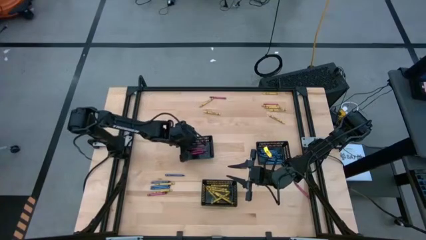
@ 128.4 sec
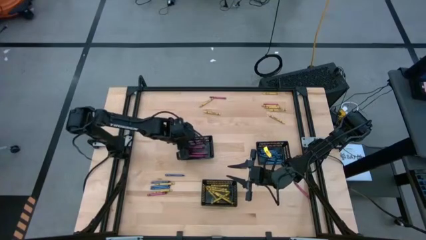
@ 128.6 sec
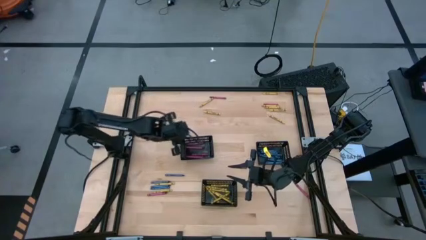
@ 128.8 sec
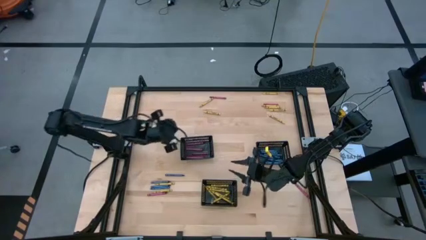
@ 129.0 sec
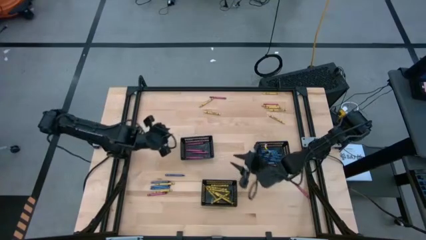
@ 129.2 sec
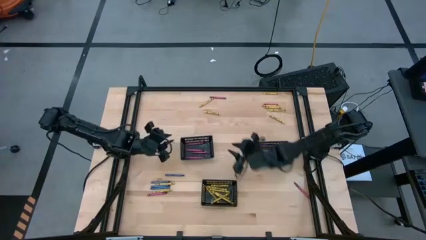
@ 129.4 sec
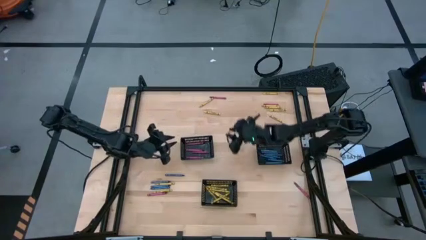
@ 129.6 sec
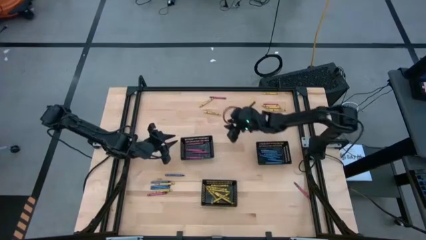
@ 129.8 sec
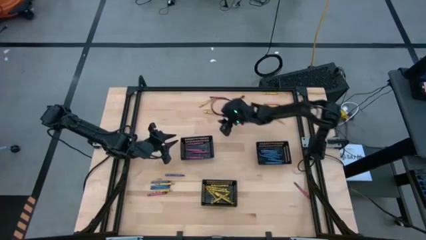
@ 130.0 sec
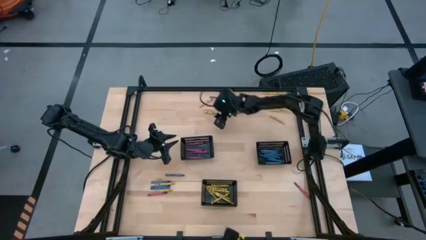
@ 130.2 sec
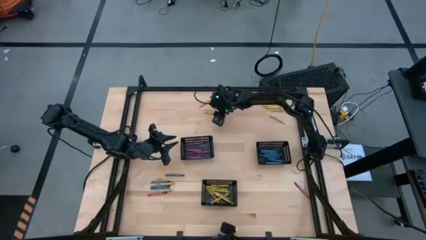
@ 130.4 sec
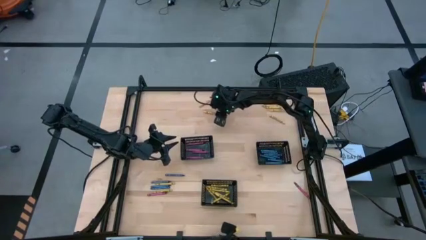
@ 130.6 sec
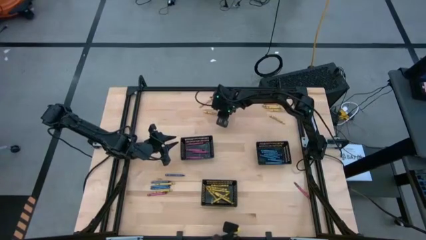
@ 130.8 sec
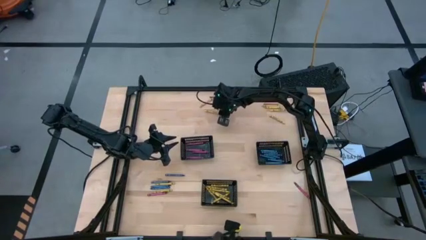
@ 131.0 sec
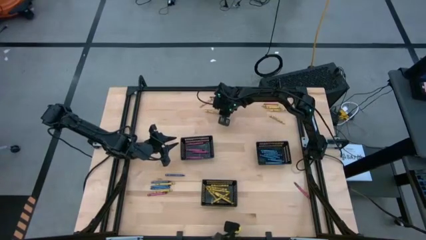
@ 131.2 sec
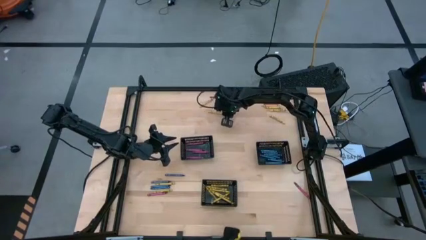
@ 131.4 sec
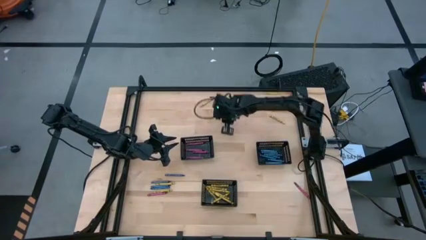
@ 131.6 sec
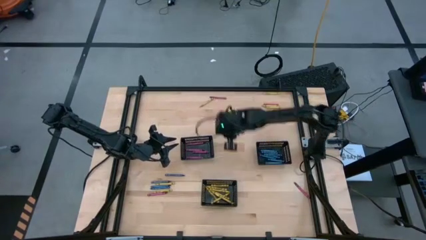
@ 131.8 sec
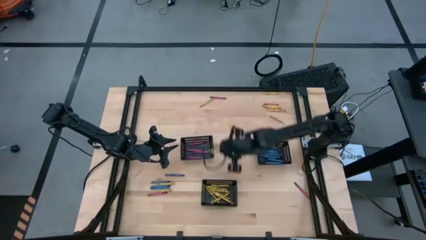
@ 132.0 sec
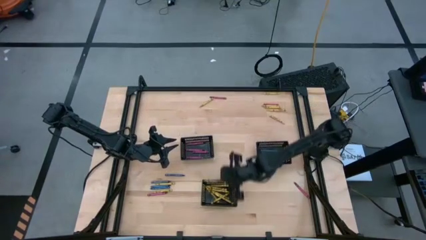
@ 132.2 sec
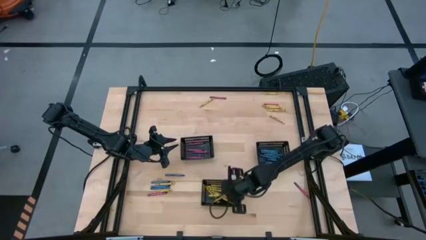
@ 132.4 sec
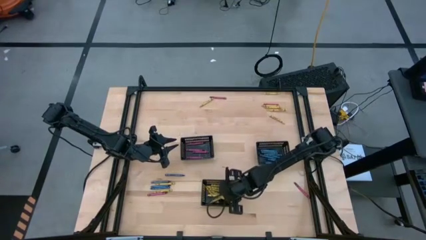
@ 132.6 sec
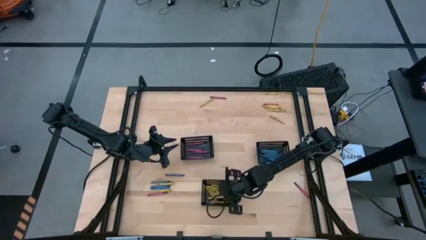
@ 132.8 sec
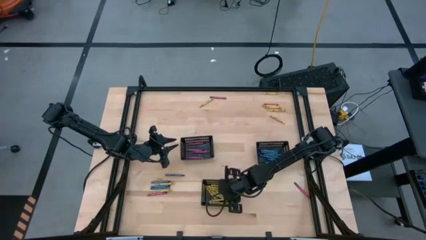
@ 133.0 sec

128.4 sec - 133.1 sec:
Task: Sort crayons
Put the yellow crayon into the bottom black bin

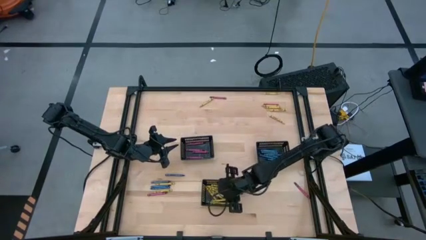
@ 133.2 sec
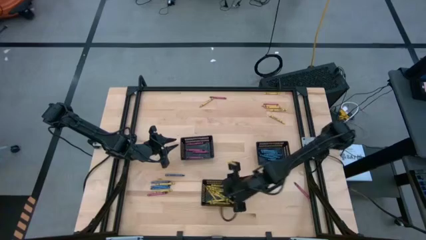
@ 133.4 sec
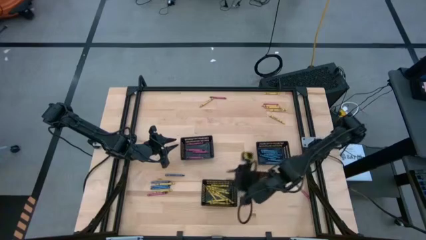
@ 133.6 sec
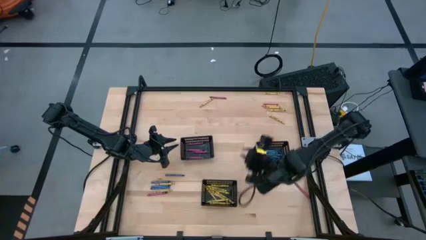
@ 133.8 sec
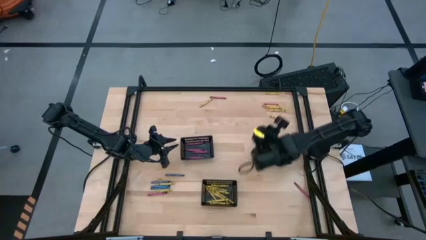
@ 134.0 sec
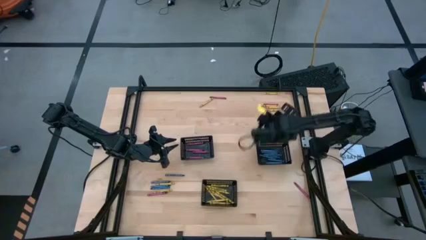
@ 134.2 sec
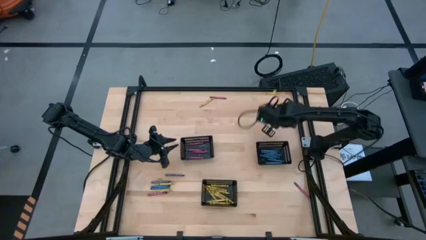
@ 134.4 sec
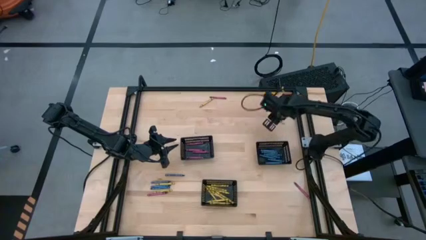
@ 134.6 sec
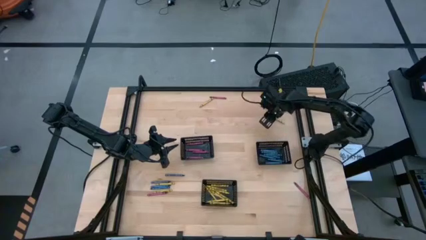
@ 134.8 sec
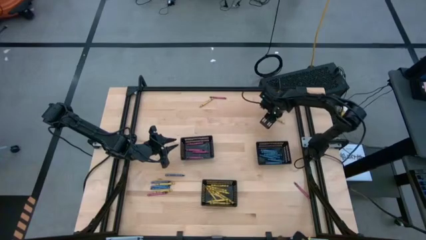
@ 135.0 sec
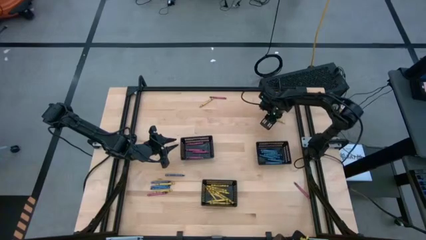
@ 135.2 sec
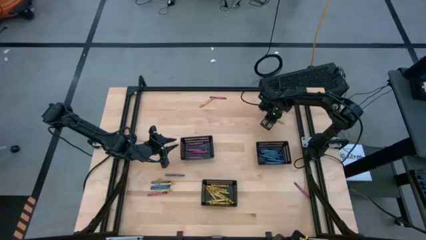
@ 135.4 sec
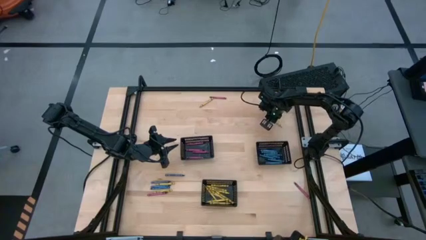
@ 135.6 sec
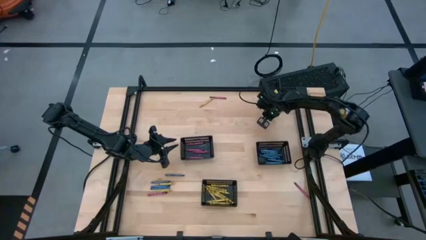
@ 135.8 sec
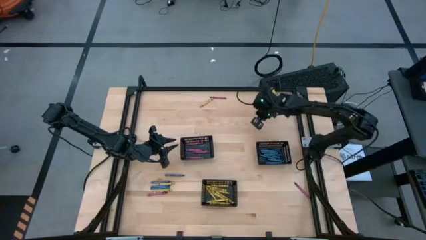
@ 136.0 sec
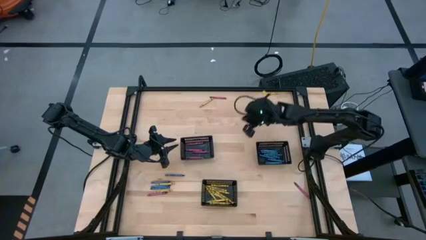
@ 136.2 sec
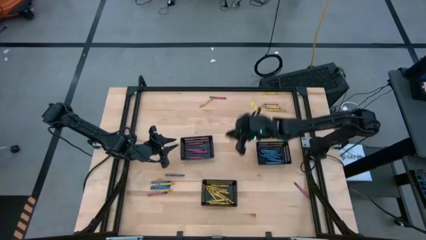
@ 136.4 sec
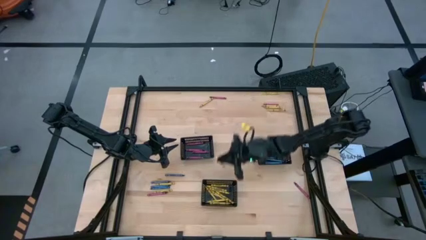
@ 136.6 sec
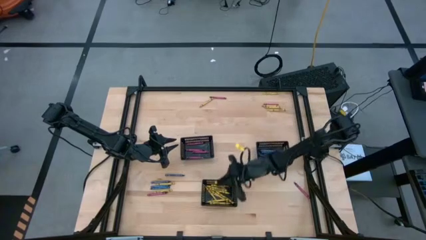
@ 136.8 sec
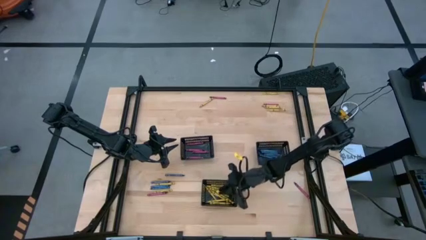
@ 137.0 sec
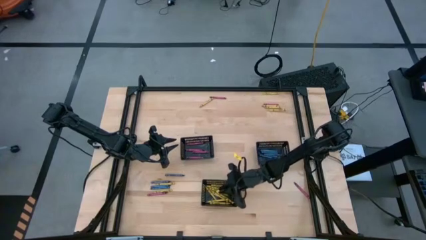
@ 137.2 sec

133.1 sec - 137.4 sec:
Put the yellow crayon into the bottom black bin

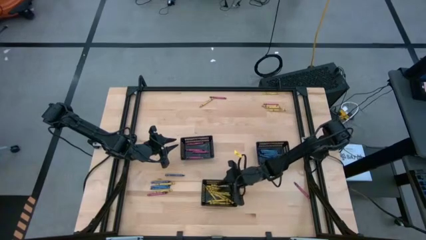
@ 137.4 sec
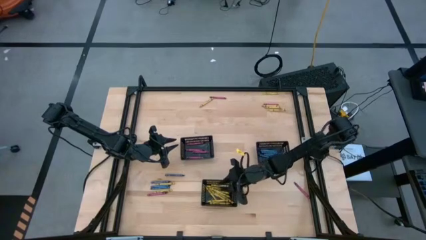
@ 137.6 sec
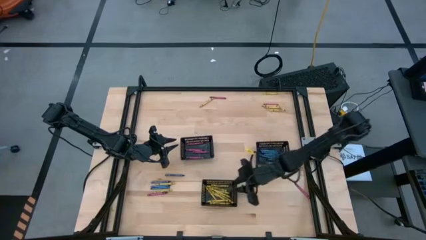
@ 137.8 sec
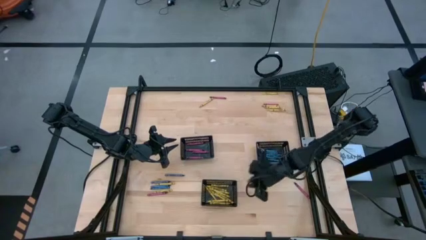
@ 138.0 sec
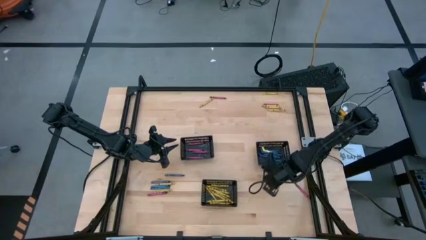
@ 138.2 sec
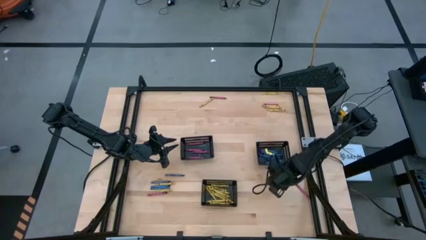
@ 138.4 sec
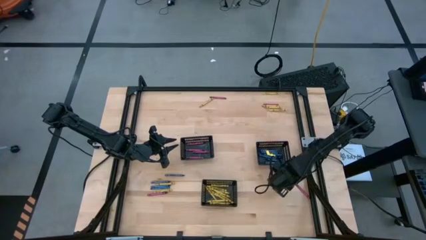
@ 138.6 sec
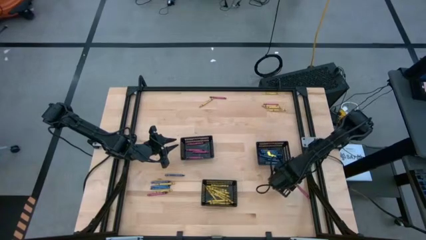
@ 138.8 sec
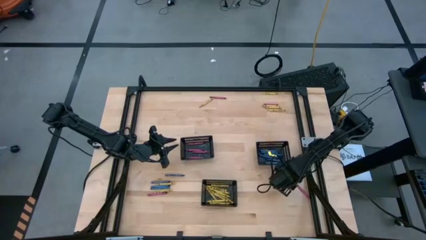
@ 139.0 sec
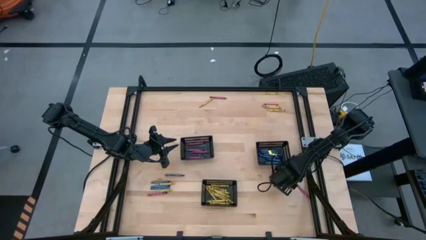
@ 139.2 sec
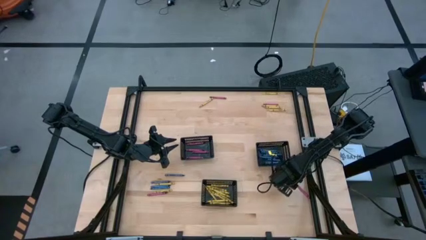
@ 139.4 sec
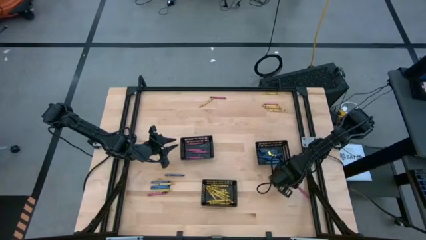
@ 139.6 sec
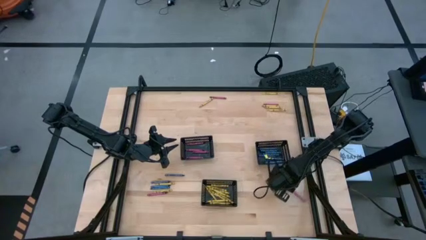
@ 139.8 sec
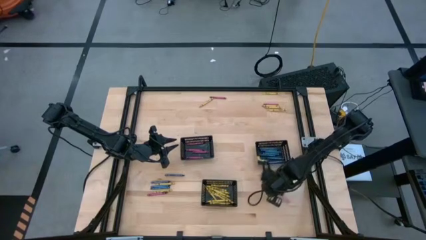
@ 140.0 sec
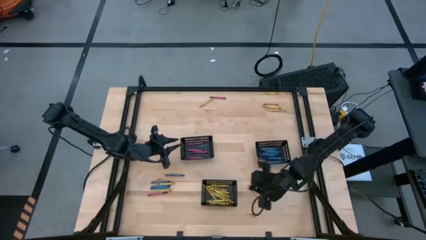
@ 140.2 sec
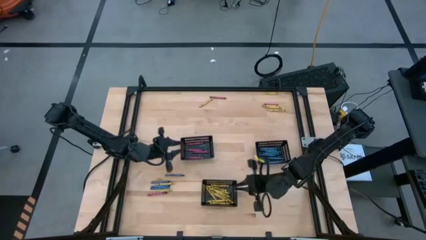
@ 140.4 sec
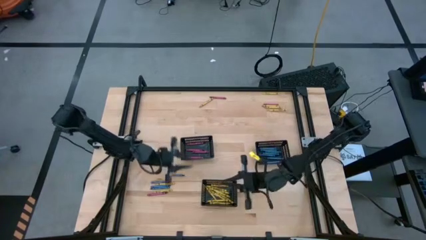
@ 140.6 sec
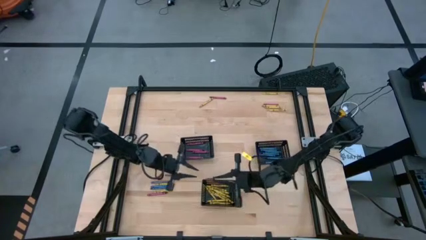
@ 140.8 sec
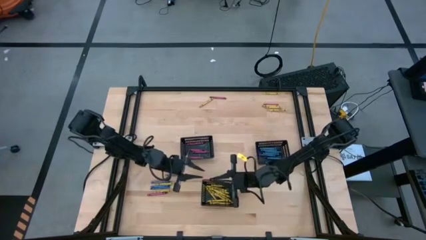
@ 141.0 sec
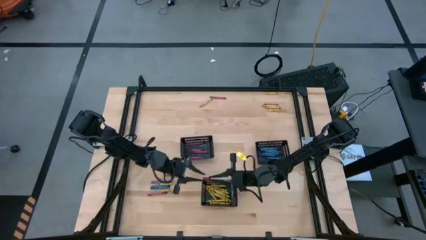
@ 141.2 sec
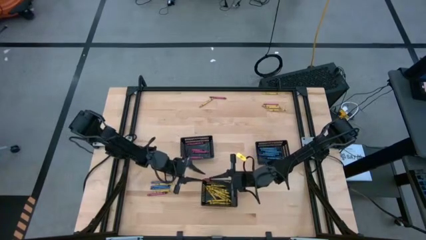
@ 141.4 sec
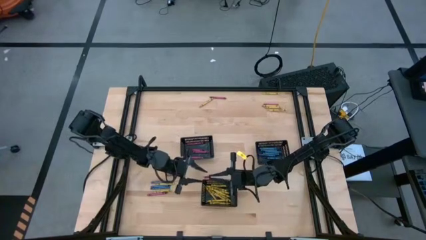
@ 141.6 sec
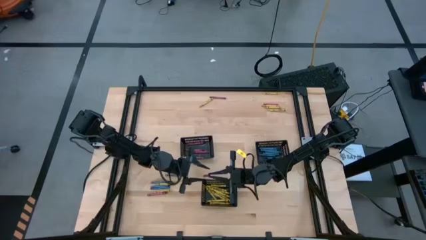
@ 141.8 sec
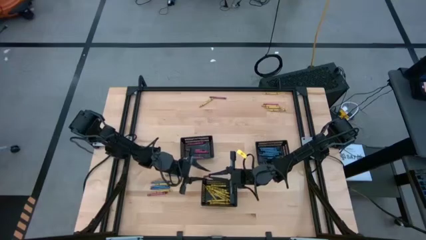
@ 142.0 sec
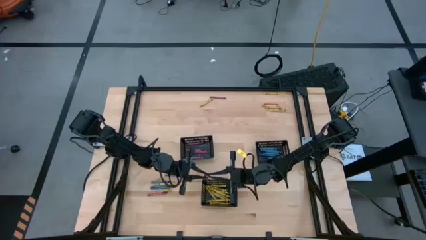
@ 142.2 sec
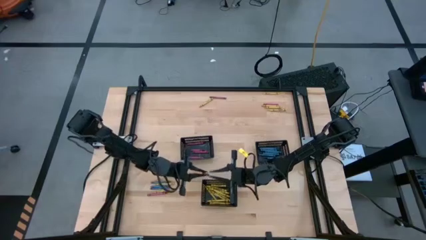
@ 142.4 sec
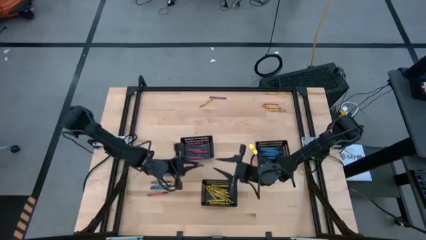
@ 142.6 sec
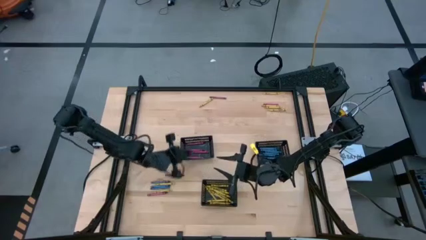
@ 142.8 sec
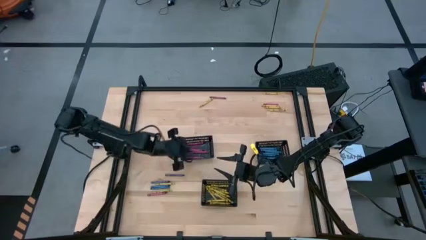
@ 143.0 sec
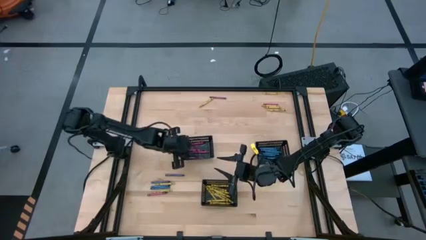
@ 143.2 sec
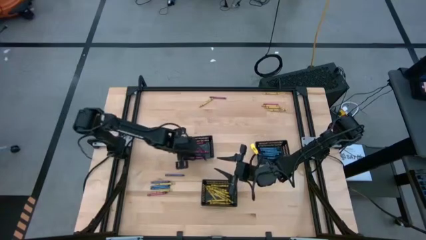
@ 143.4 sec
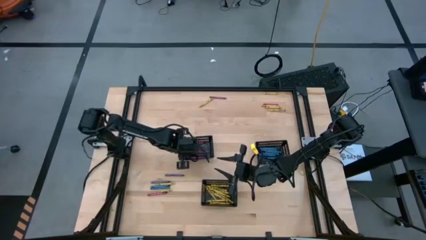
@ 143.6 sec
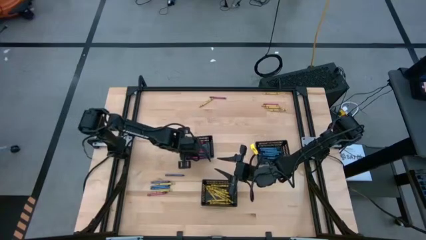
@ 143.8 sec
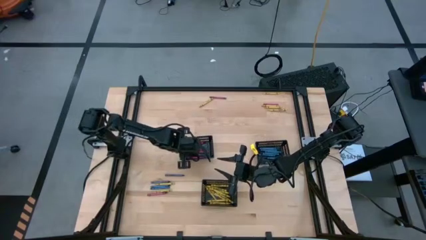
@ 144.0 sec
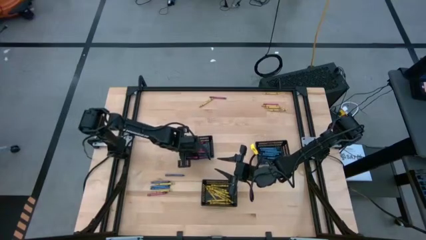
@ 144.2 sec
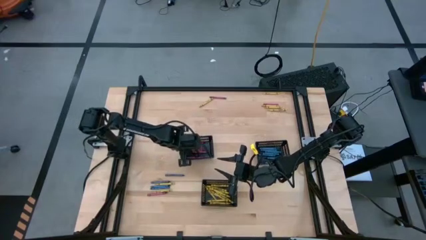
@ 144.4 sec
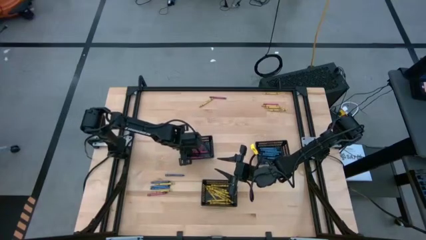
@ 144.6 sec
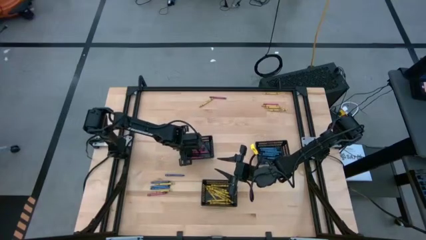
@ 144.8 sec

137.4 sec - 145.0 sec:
Put the red crayon into the left black bin
